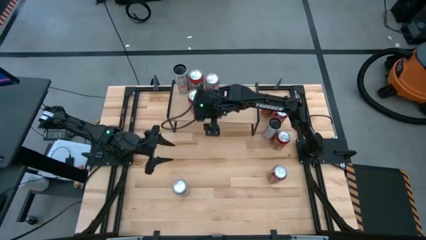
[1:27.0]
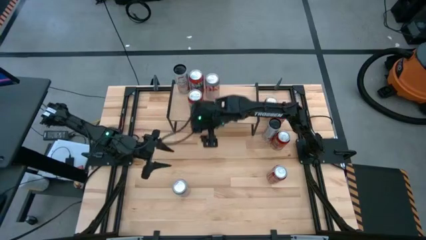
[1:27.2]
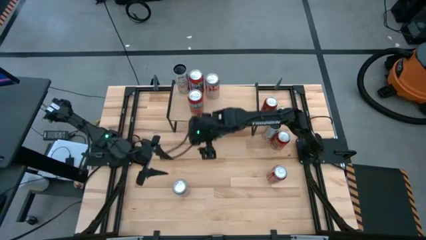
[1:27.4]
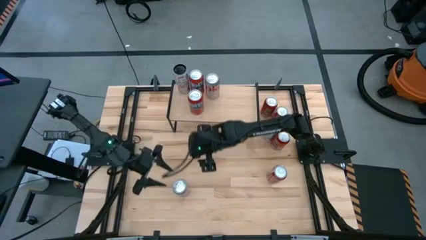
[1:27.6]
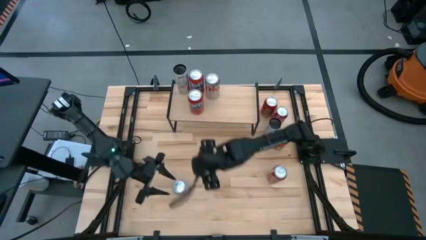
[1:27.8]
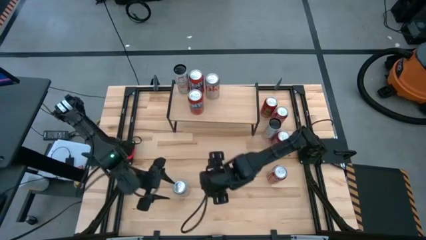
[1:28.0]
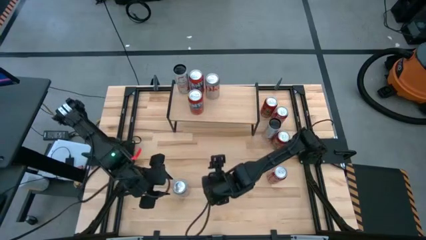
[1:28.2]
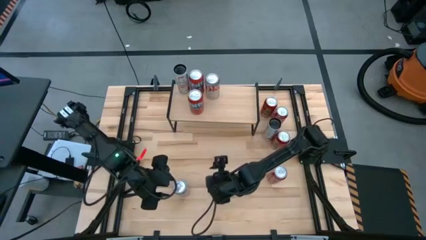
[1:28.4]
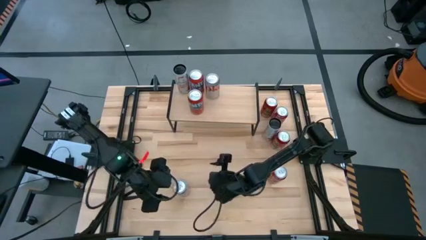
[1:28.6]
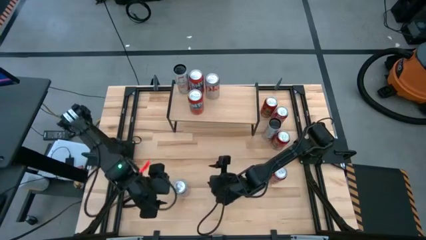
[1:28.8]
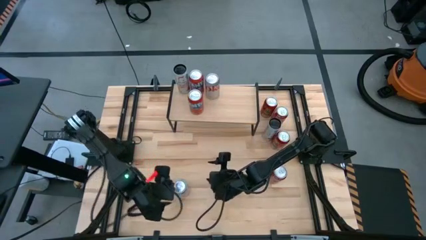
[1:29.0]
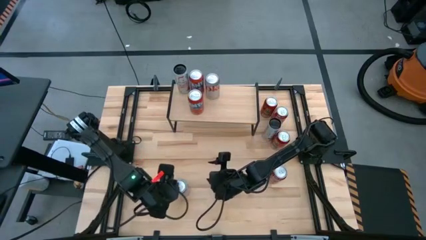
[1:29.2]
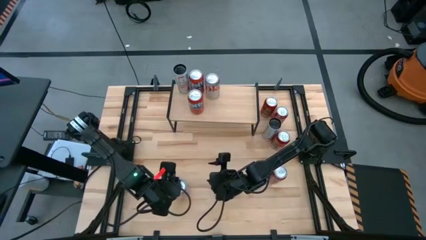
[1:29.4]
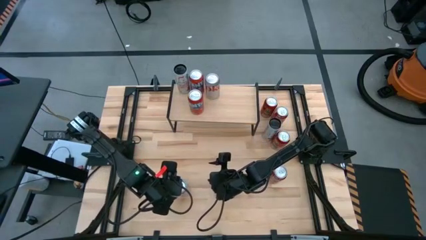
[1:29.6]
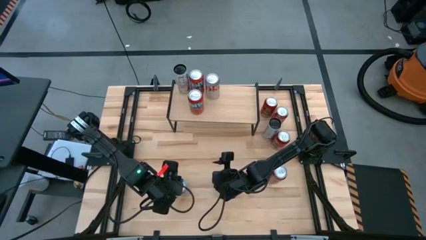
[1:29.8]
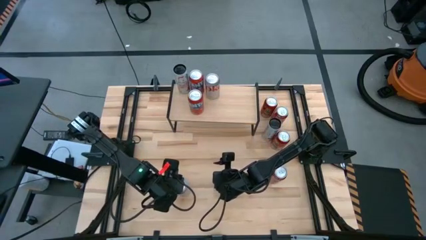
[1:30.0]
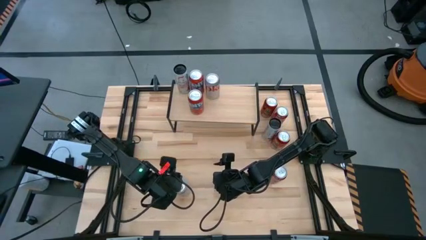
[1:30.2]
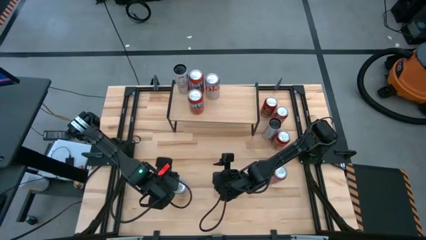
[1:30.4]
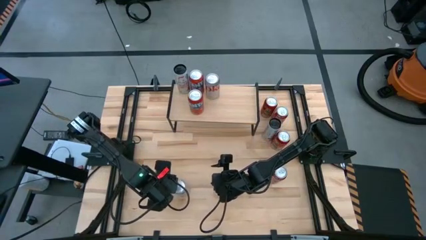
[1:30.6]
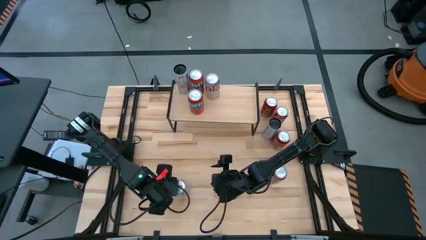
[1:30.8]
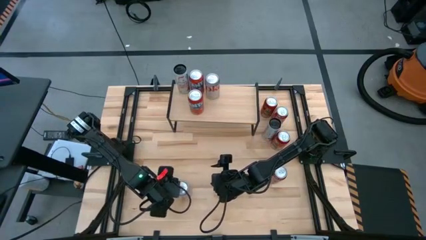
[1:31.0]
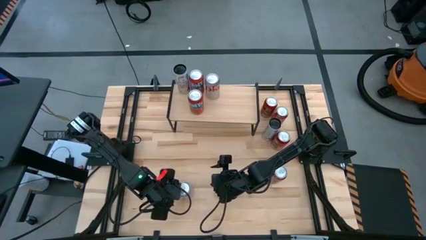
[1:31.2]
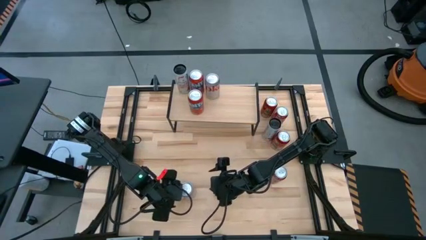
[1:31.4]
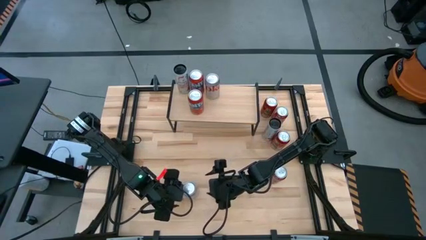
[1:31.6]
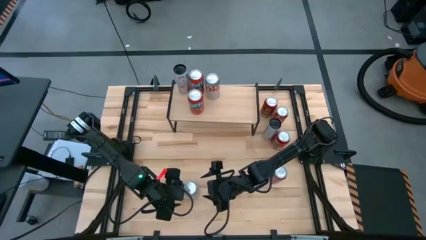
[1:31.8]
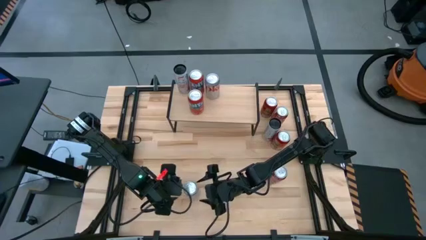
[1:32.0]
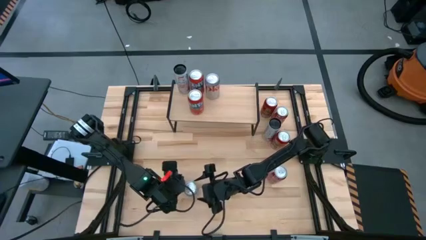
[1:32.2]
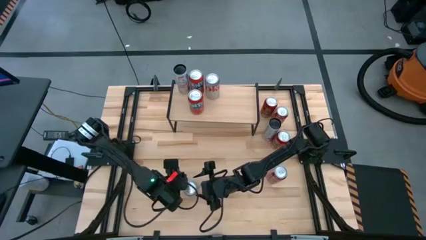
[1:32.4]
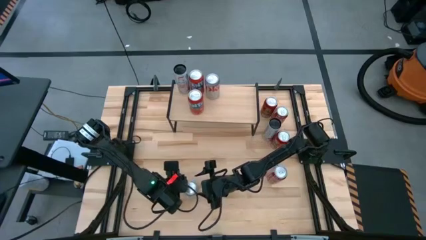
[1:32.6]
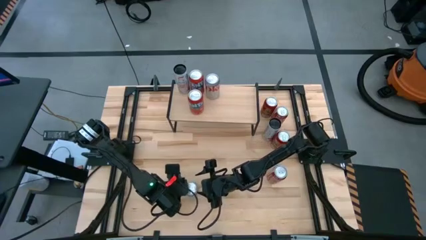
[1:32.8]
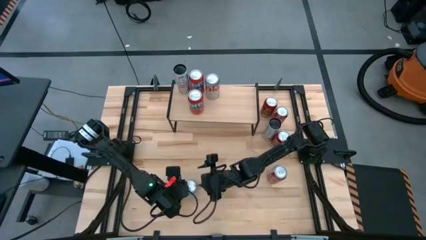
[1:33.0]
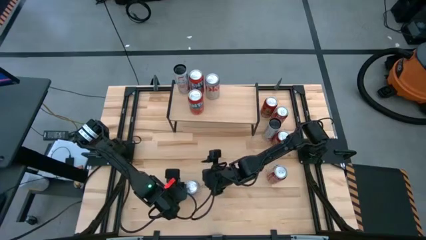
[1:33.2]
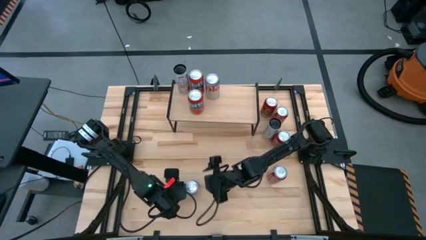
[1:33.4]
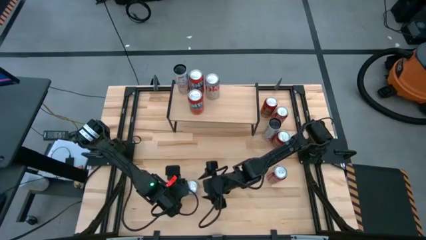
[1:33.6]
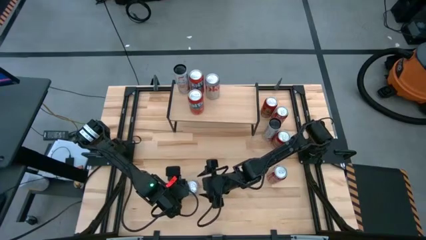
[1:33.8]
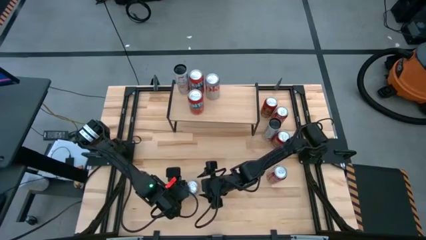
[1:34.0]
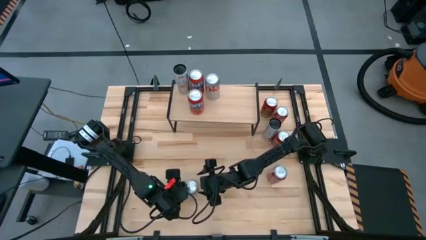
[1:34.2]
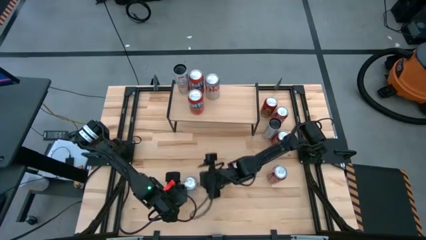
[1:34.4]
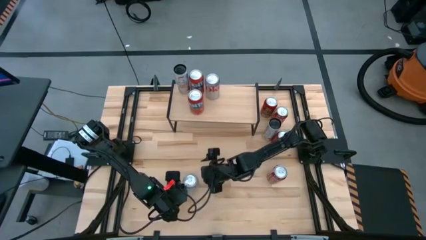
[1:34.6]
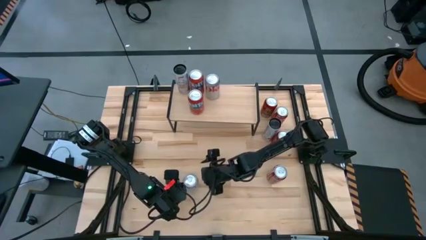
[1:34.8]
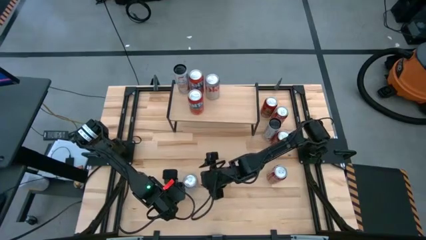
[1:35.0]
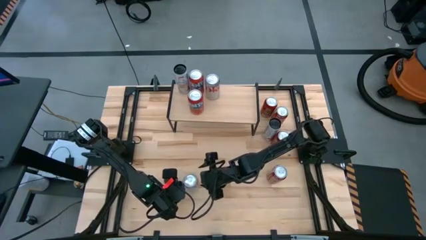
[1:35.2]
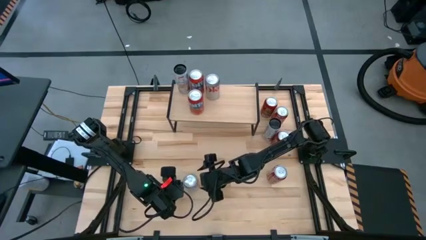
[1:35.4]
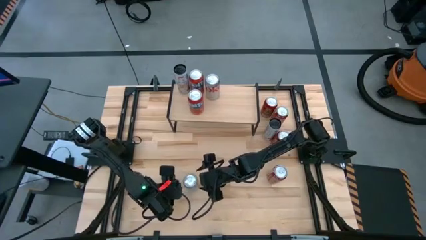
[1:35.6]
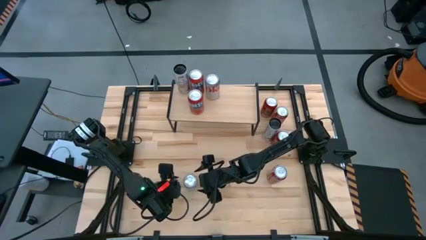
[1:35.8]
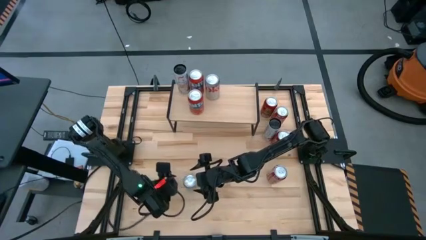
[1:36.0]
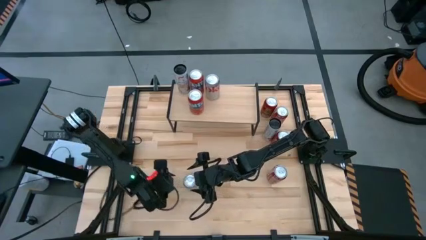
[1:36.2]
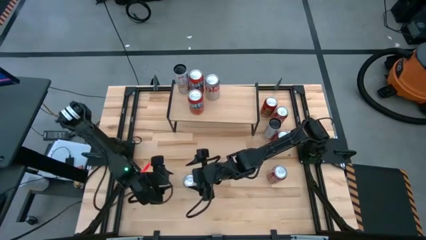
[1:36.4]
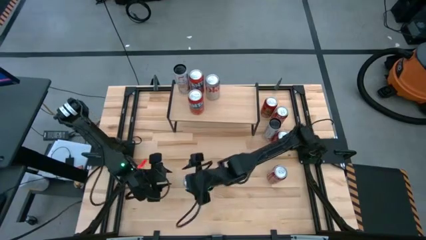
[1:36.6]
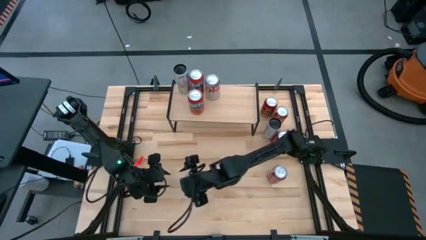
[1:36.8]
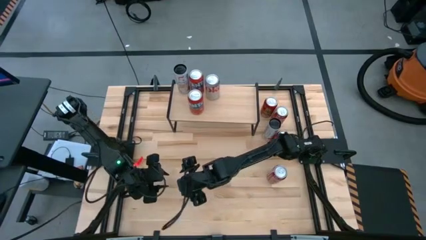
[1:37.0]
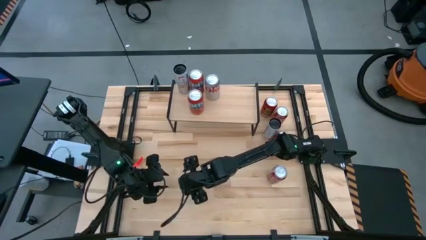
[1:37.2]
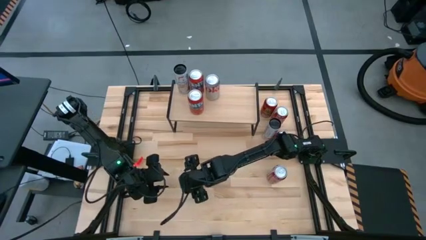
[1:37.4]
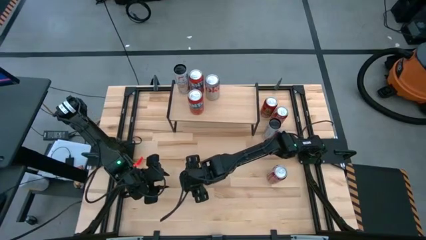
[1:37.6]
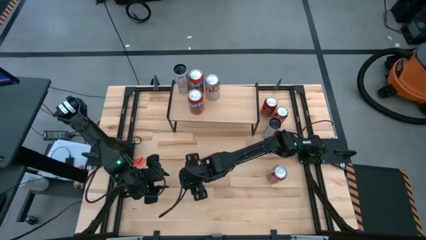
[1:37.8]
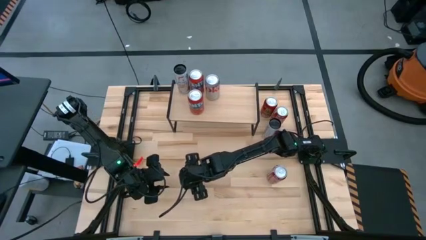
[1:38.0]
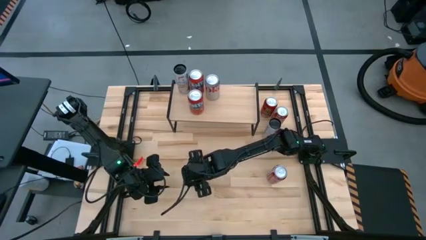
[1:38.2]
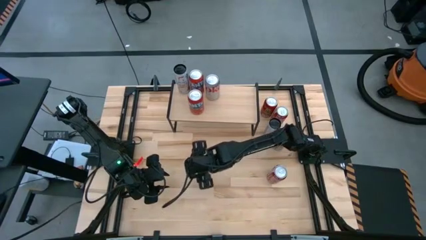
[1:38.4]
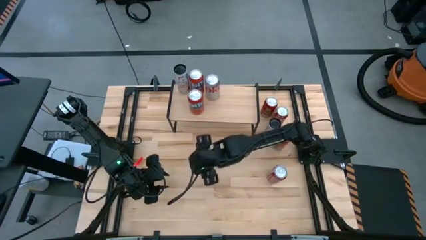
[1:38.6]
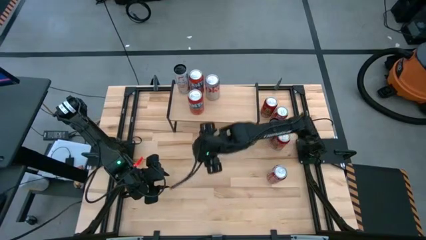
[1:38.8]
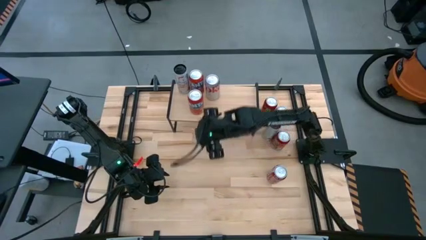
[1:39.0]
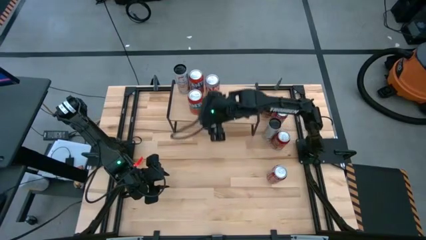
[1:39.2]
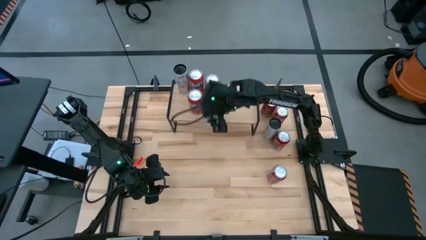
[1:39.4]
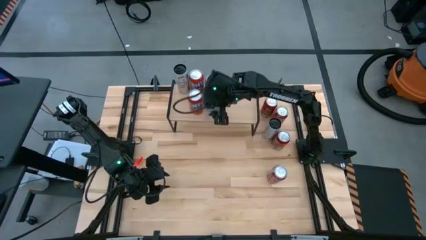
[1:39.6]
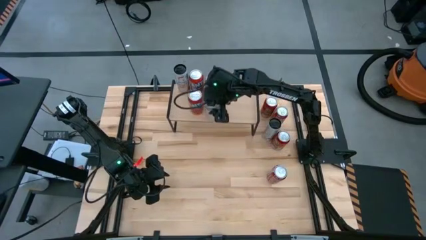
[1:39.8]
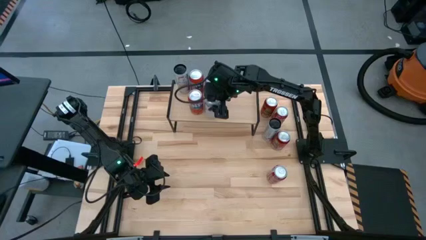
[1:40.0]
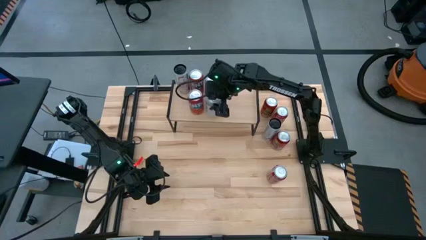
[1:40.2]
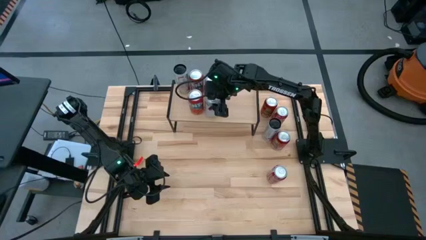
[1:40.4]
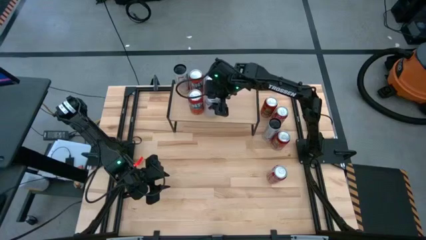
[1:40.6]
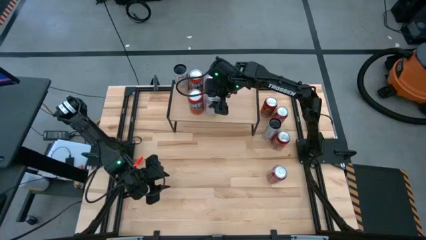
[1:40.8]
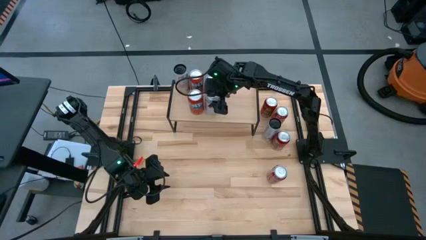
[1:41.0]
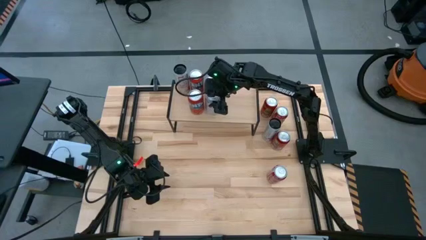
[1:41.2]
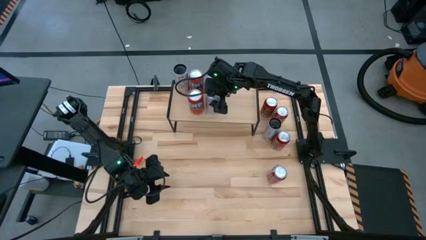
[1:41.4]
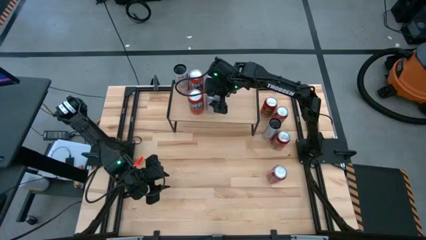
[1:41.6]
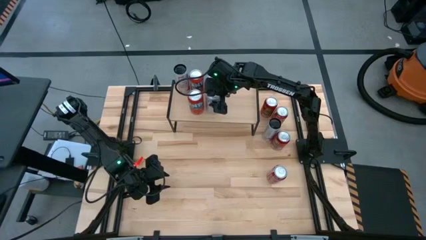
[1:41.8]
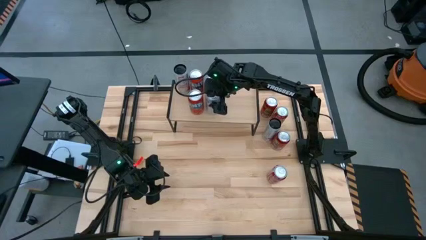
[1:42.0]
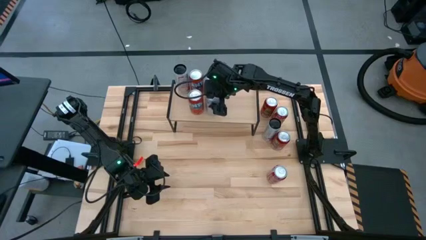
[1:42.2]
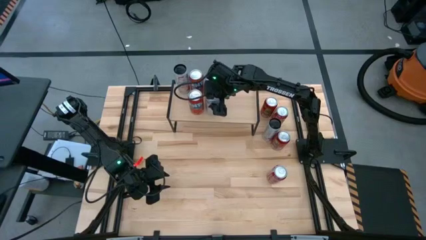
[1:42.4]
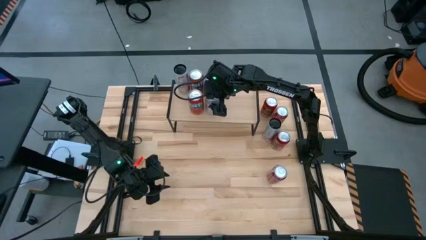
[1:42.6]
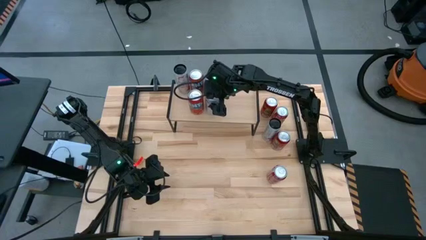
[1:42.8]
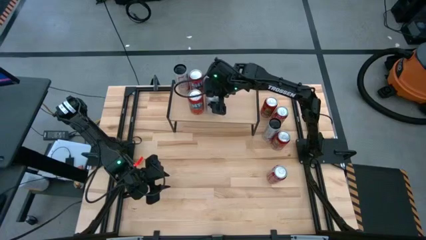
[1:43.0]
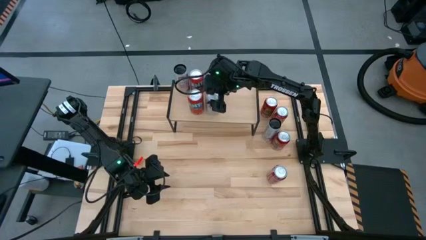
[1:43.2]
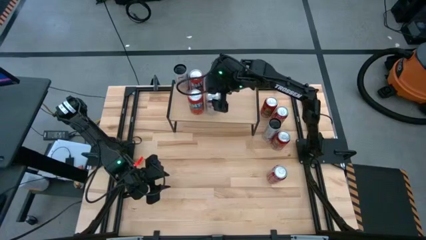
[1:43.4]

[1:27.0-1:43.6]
Task: Place canned beverage on shelf
Put the bottom left silver soda can on the shelf aligned with the other silver soda can
